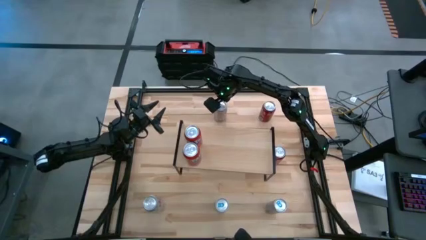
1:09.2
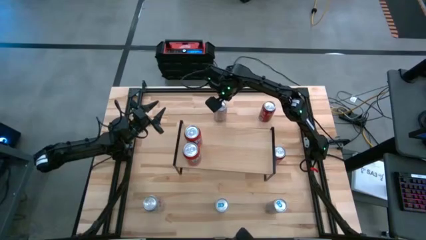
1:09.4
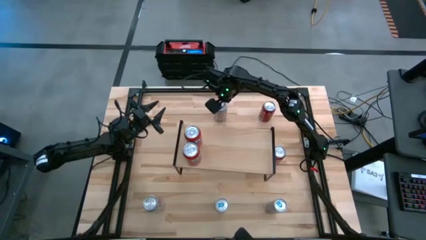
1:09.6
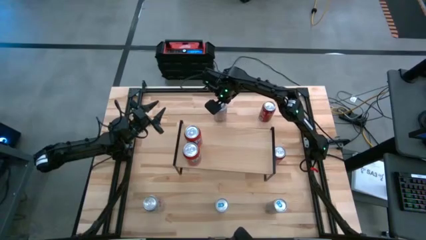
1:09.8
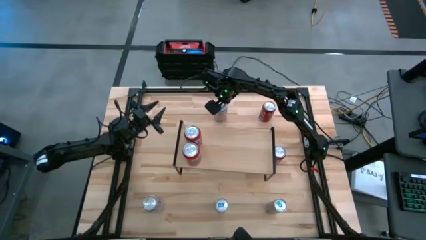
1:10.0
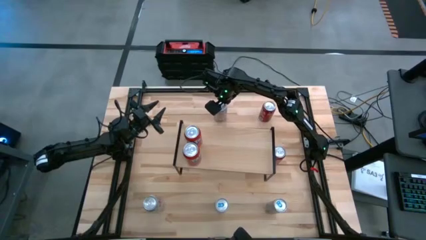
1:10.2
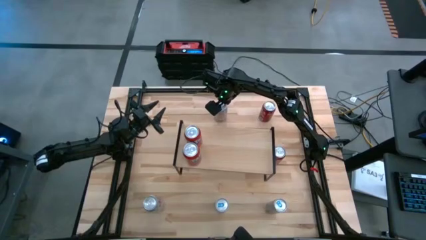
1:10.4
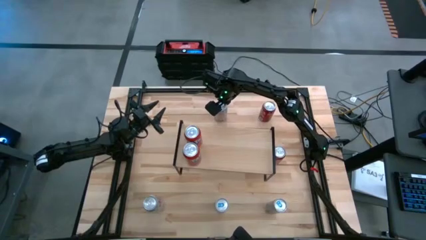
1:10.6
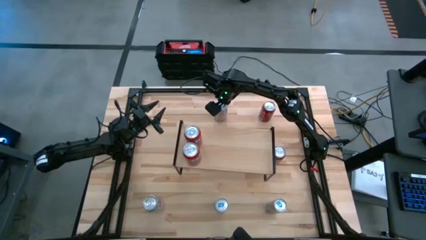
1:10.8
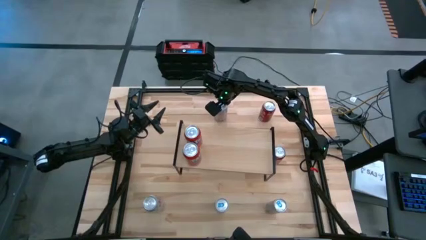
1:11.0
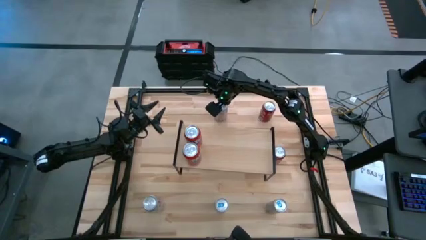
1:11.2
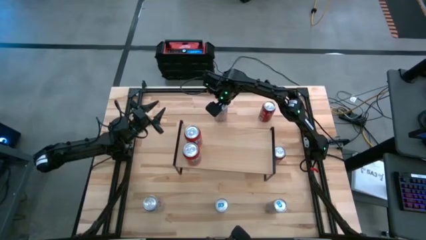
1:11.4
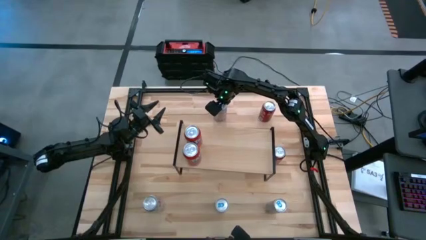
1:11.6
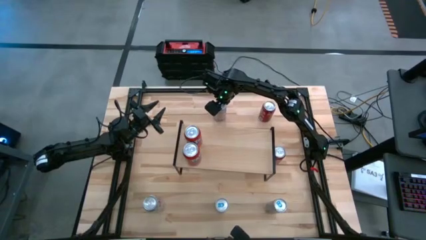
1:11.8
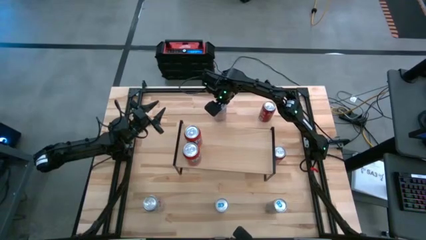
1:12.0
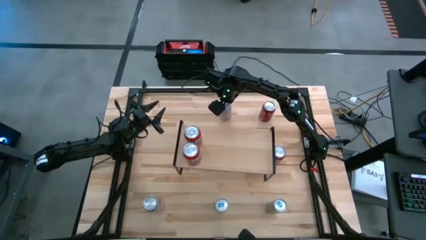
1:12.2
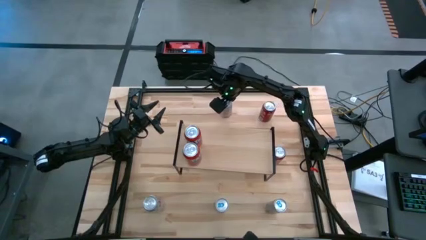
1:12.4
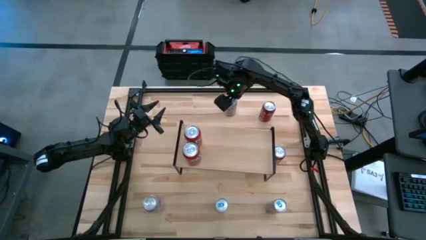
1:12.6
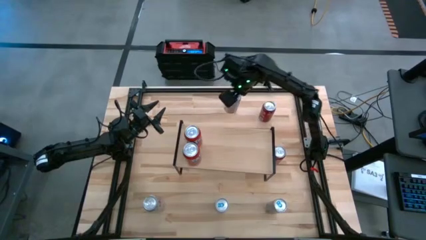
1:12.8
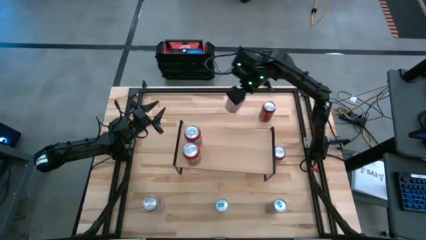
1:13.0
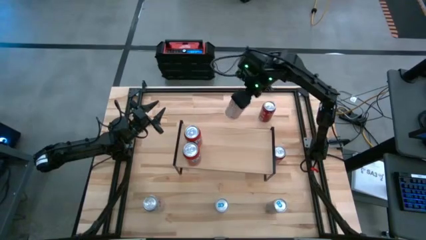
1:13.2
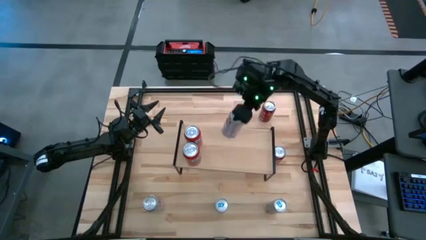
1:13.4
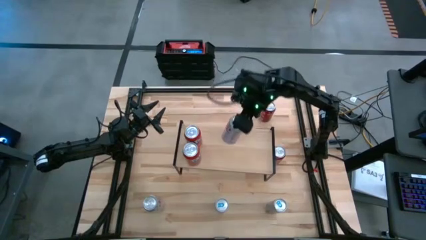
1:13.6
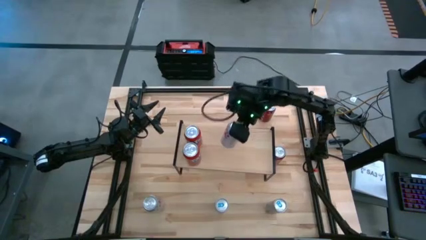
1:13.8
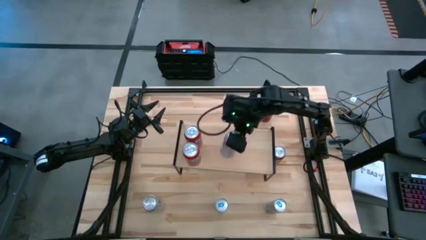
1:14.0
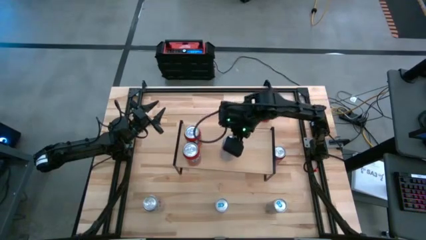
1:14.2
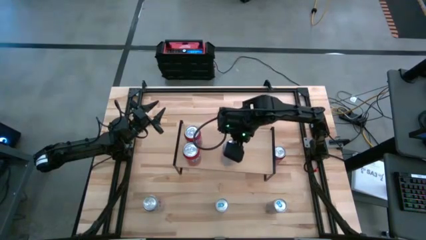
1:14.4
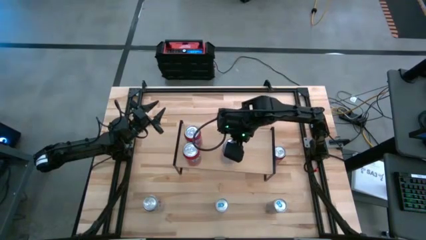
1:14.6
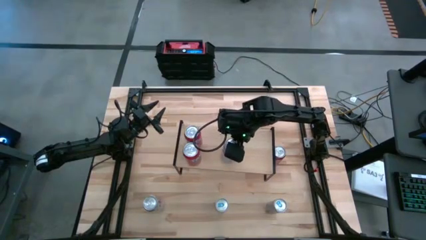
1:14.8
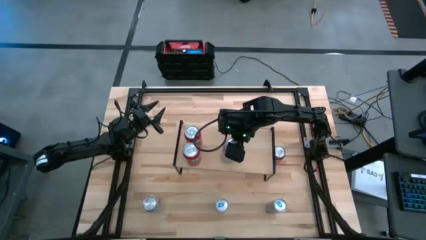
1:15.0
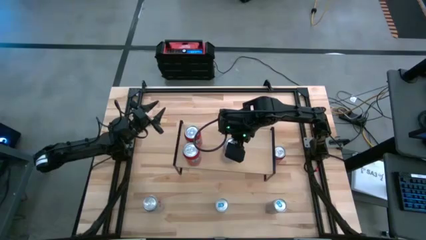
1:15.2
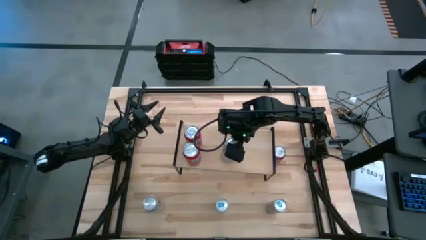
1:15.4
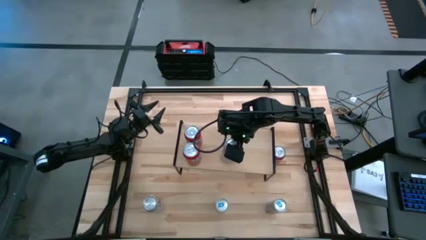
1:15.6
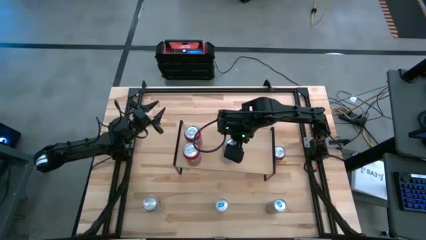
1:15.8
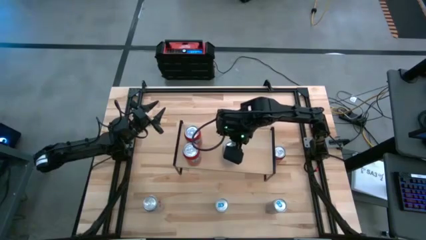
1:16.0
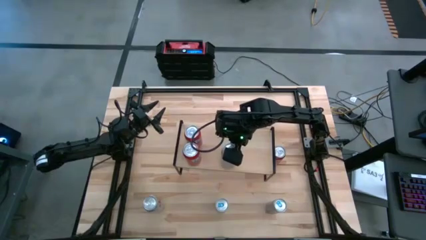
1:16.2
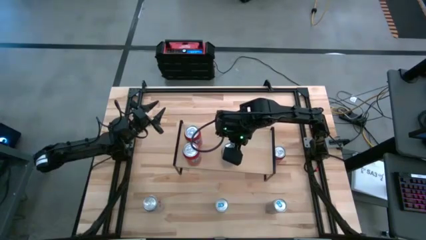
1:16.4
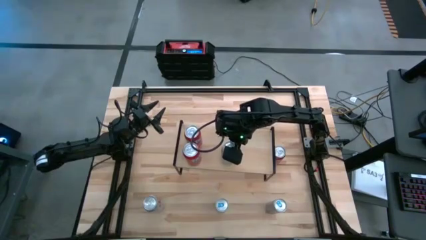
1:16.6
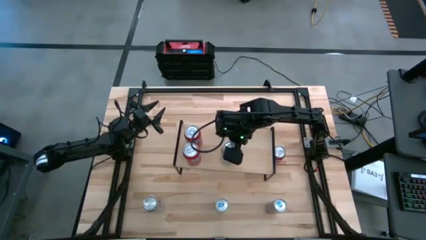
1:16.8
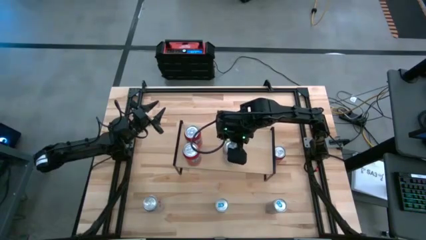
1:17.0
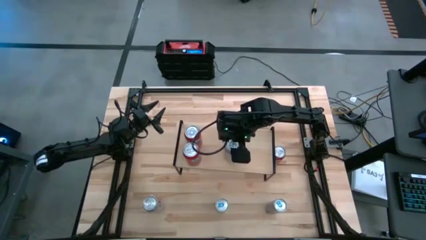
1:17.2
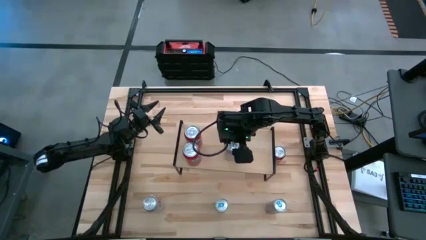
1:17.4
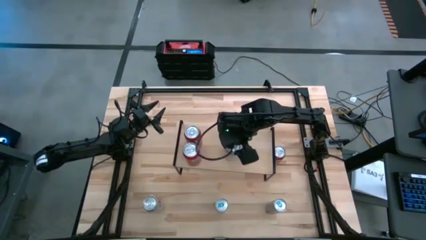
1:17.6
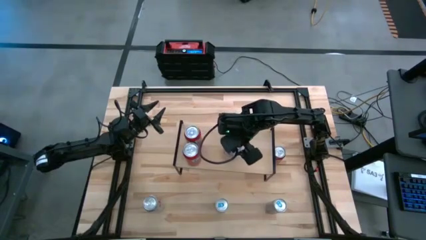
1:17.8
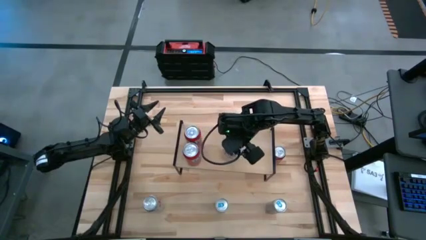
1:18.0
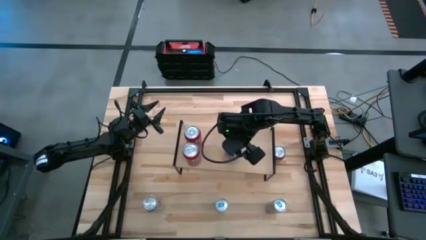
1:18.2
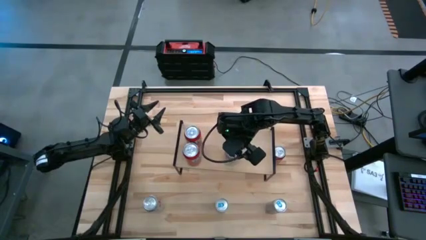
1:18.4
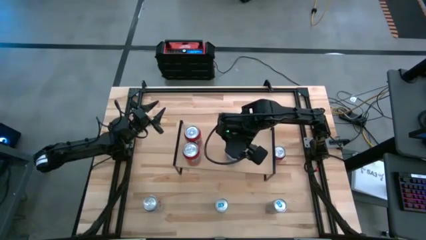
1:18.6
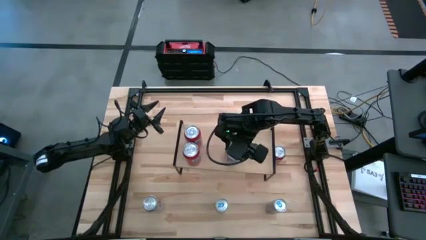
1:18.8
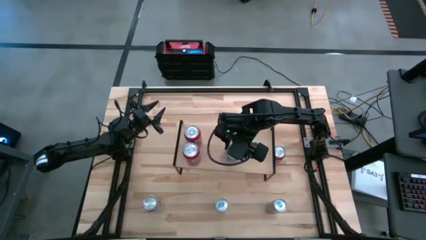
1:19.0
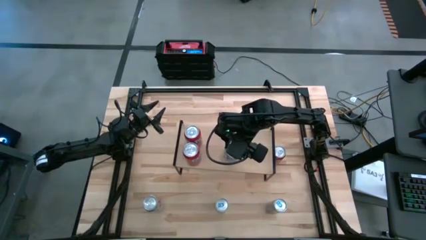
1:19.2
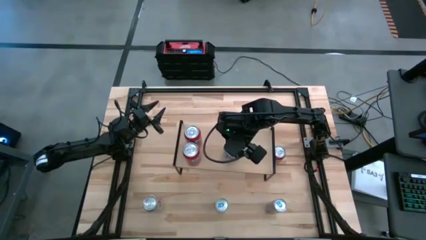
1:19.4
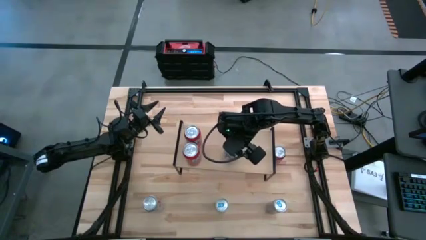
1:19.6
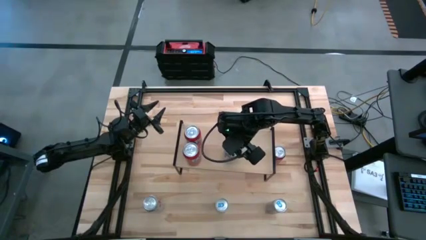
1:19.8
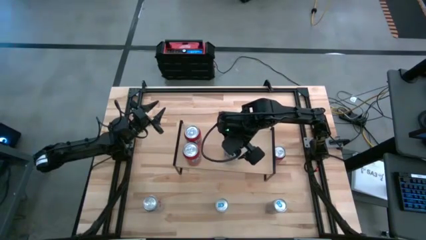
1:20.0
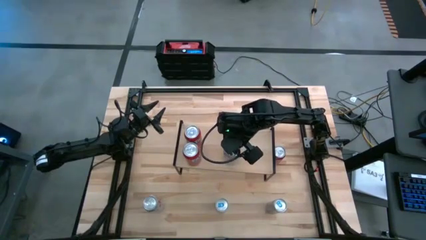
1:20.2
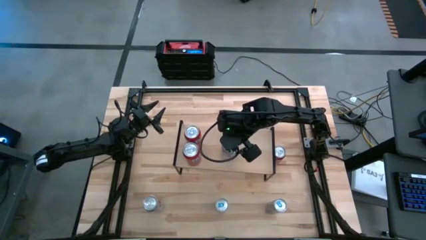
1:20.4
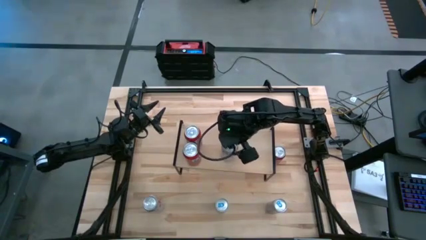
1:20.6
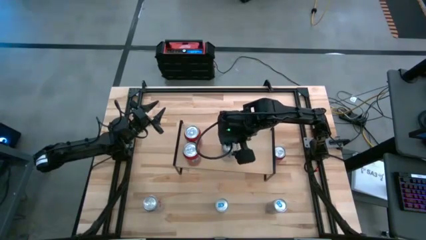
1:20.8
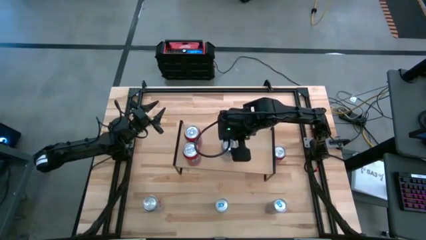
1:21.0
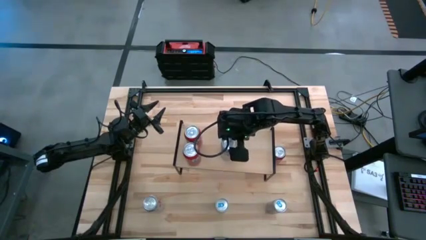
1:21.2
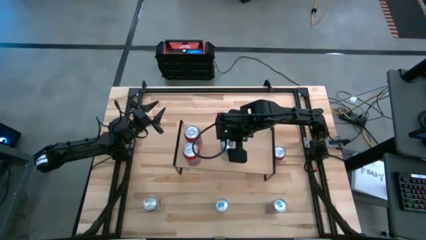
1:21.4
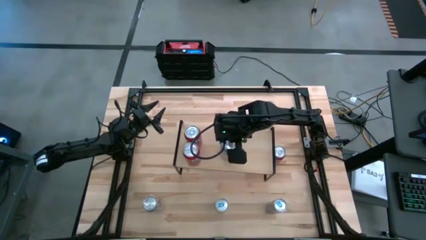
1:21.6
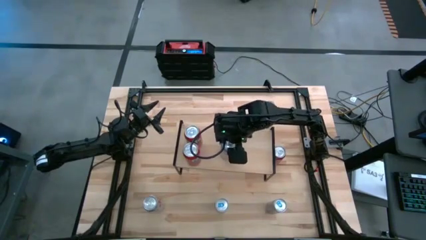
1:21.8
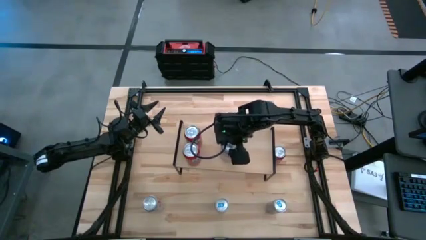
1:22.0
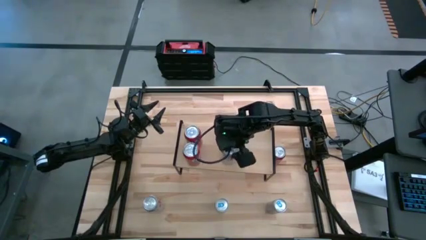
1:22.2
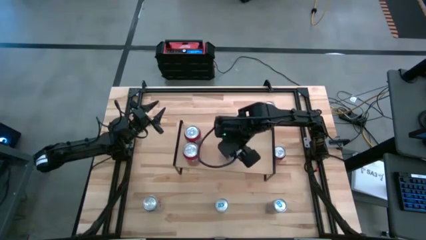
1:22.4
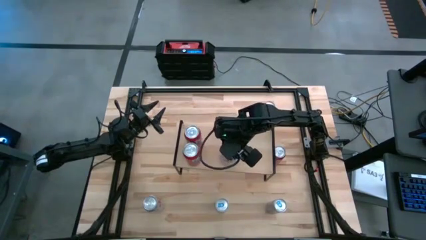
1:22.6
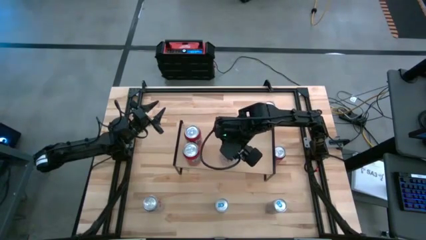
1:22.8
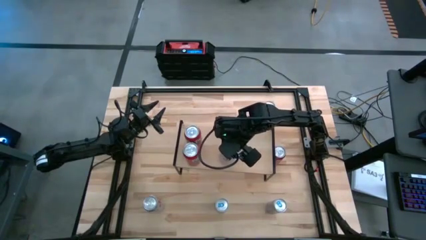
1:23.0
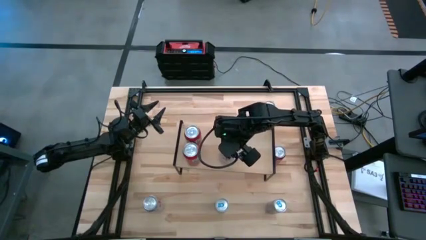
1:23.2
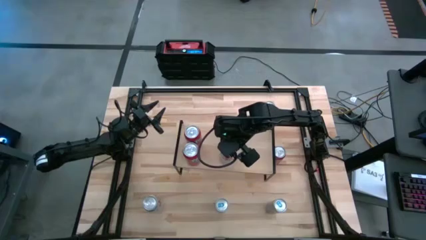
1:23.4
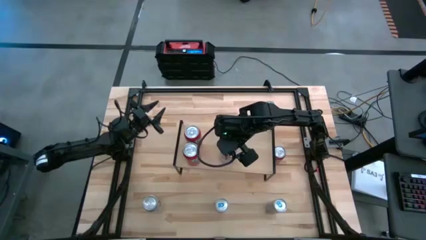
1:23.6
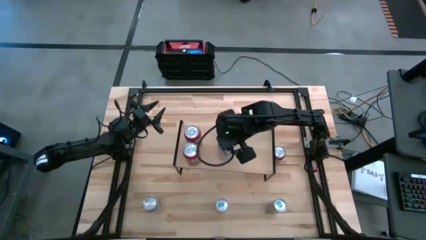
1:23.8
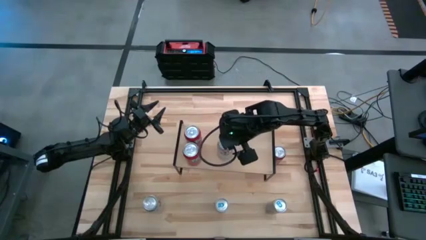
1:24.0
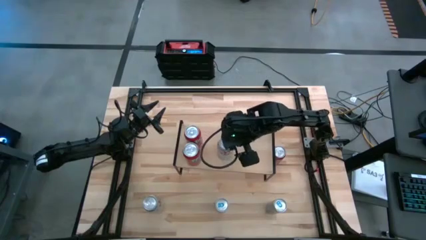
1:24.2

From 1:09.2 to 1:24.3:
Task: Place canned beverage on shelf
Put the top silver soda can on the shelf
